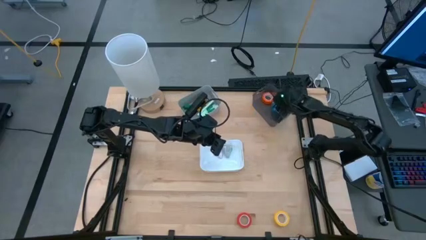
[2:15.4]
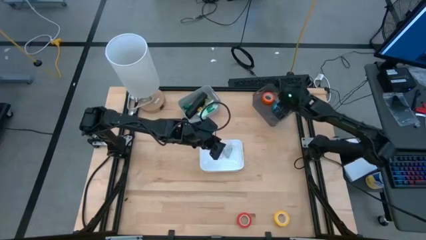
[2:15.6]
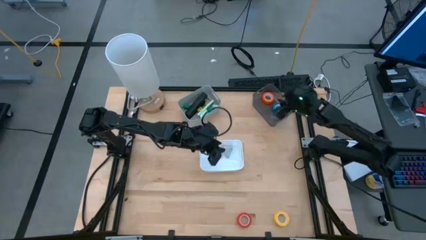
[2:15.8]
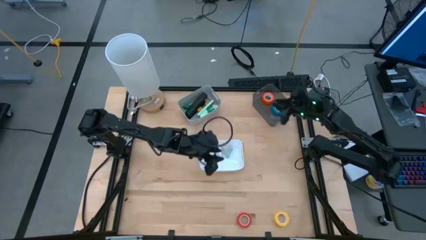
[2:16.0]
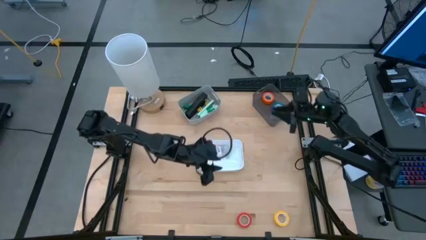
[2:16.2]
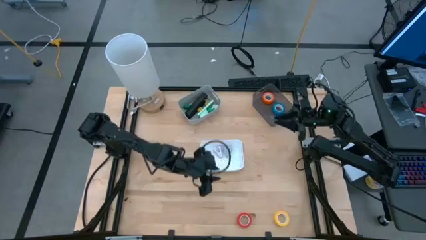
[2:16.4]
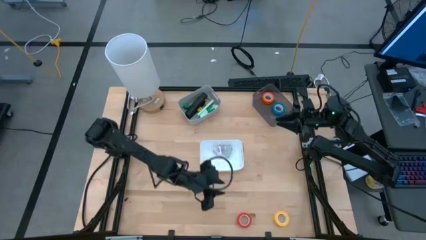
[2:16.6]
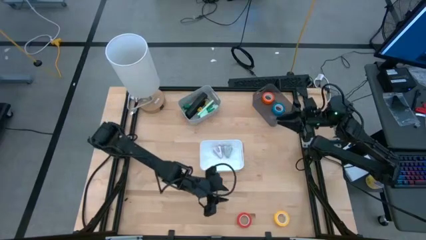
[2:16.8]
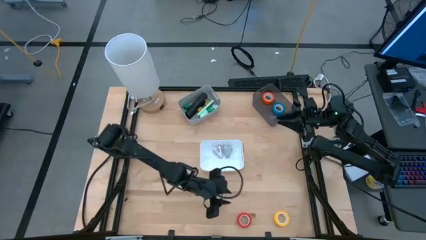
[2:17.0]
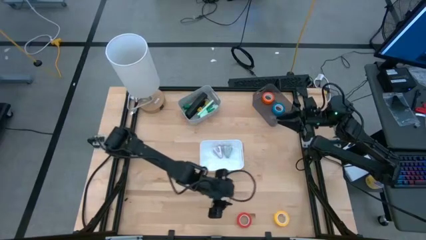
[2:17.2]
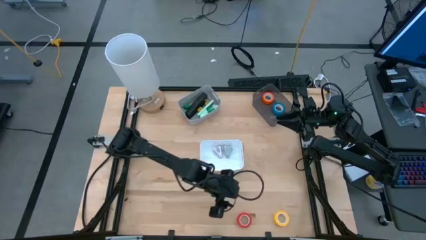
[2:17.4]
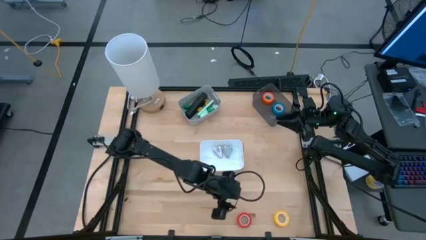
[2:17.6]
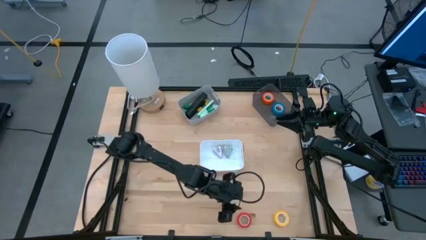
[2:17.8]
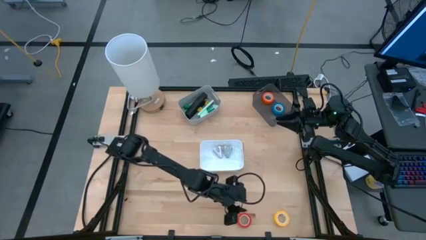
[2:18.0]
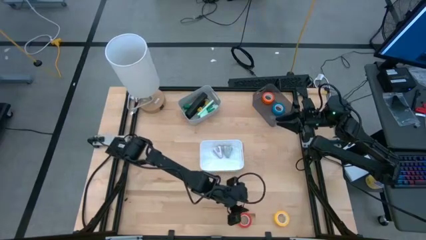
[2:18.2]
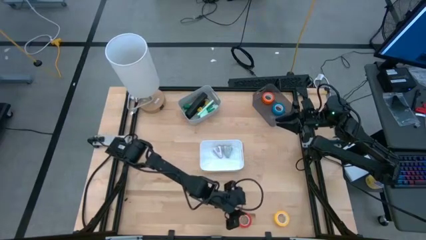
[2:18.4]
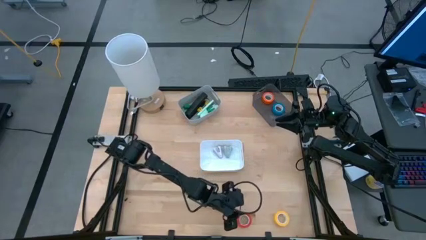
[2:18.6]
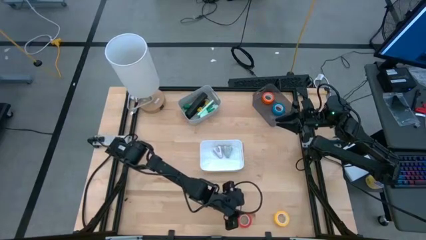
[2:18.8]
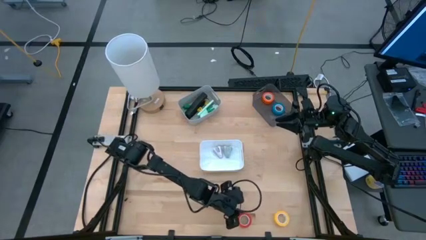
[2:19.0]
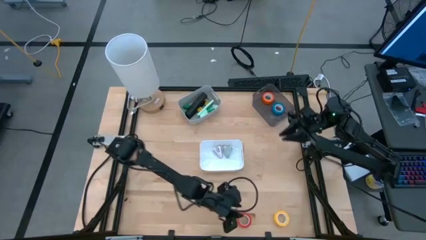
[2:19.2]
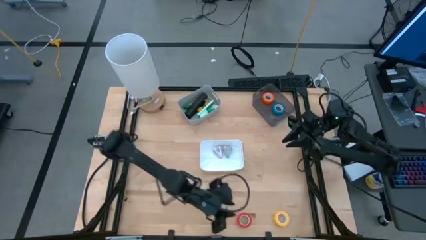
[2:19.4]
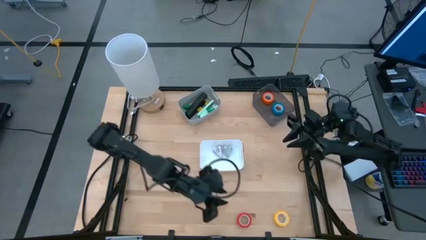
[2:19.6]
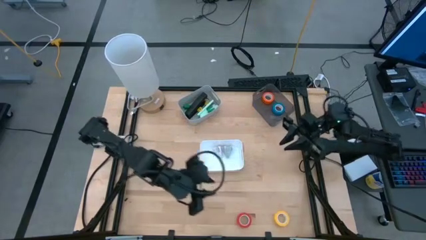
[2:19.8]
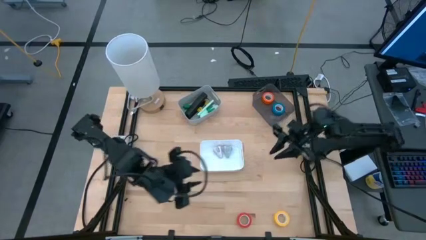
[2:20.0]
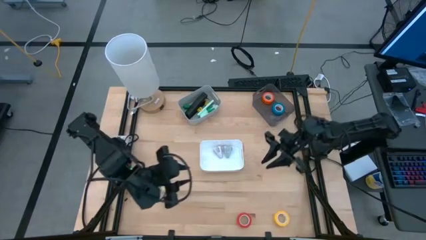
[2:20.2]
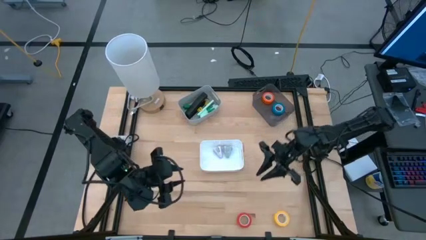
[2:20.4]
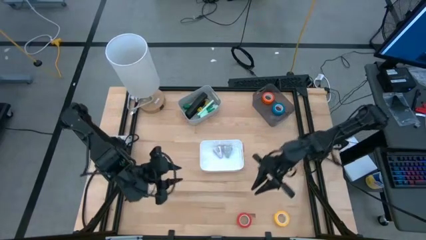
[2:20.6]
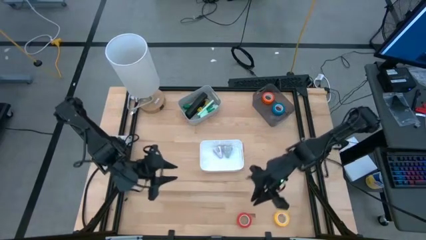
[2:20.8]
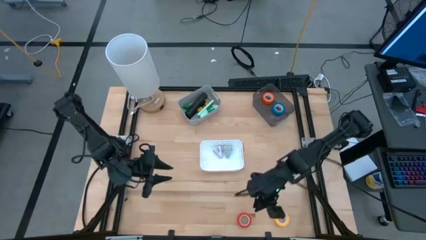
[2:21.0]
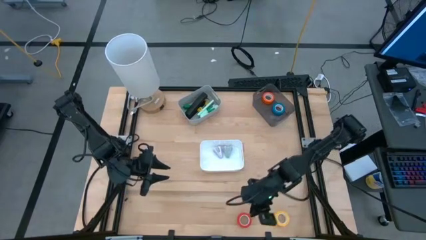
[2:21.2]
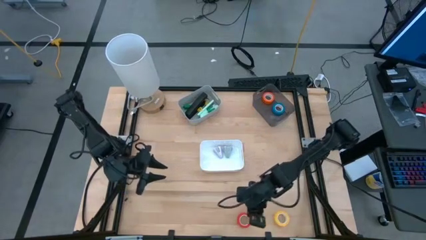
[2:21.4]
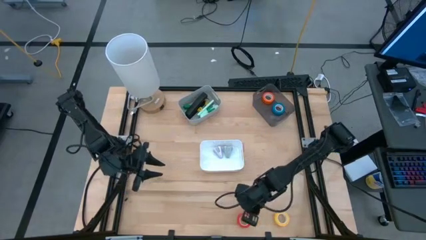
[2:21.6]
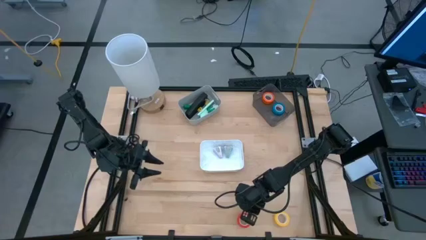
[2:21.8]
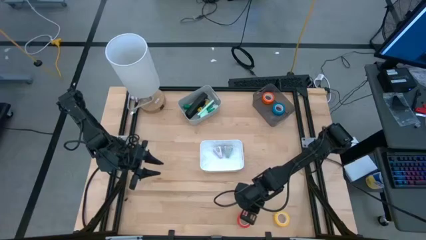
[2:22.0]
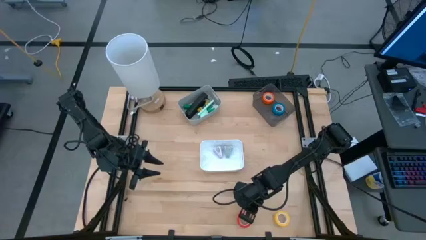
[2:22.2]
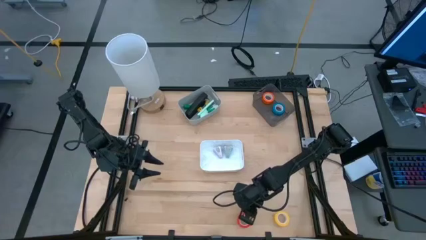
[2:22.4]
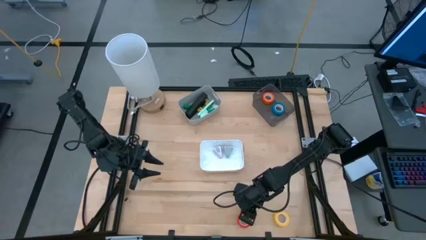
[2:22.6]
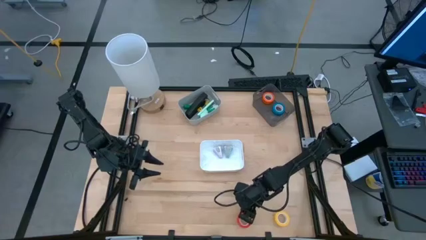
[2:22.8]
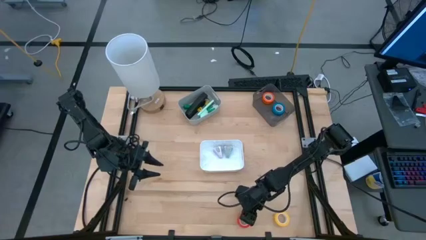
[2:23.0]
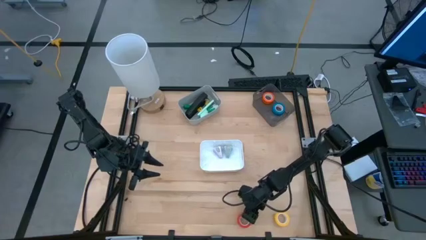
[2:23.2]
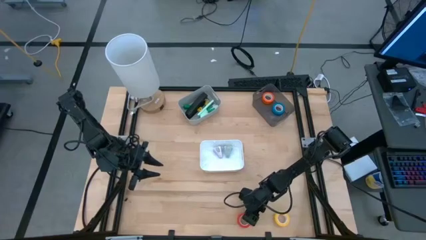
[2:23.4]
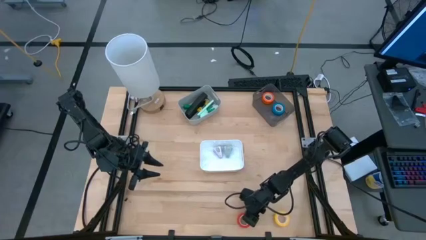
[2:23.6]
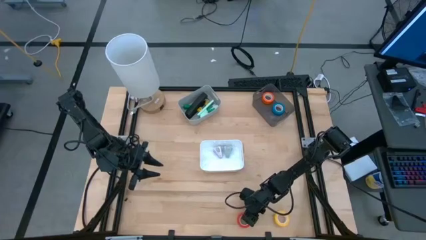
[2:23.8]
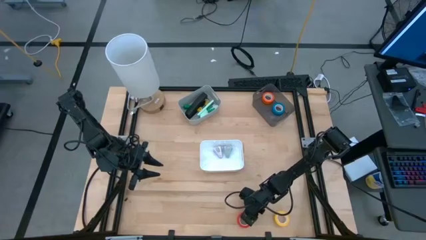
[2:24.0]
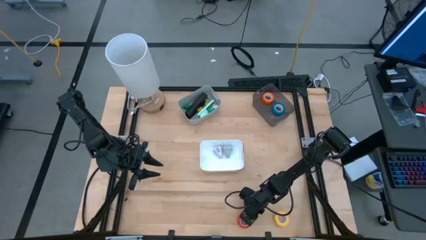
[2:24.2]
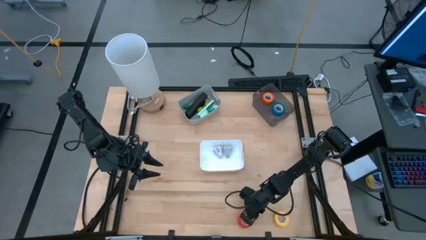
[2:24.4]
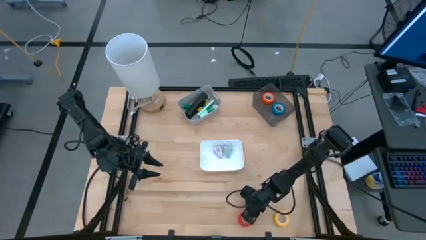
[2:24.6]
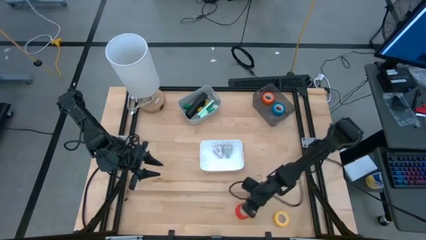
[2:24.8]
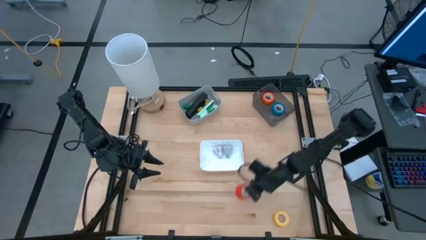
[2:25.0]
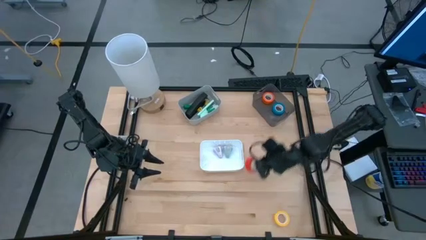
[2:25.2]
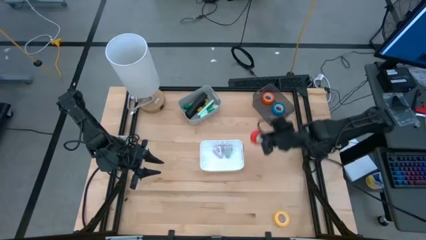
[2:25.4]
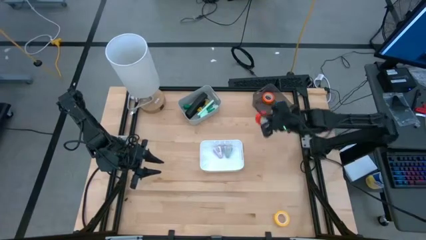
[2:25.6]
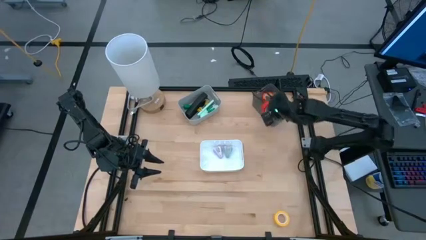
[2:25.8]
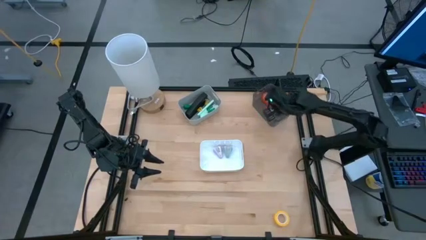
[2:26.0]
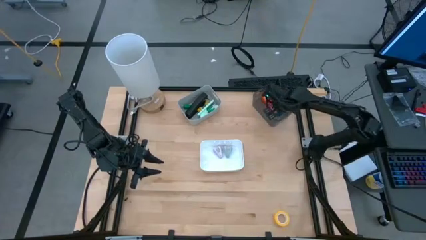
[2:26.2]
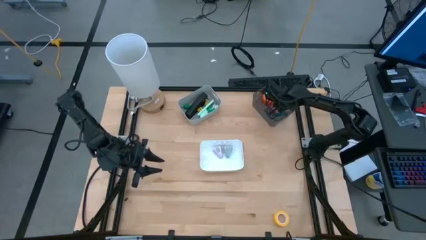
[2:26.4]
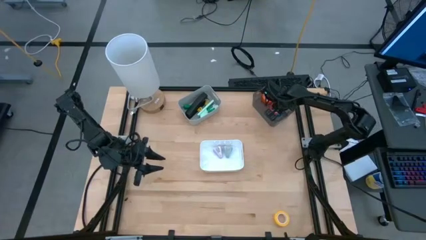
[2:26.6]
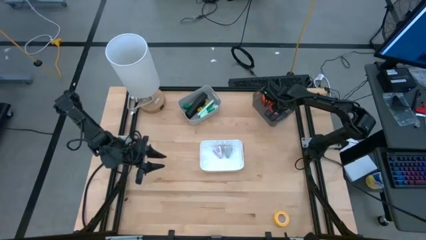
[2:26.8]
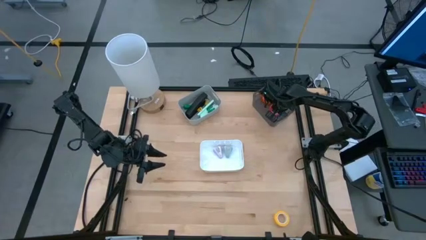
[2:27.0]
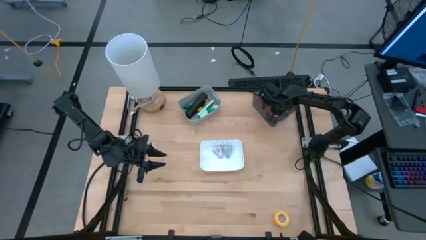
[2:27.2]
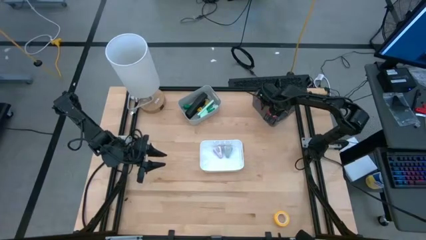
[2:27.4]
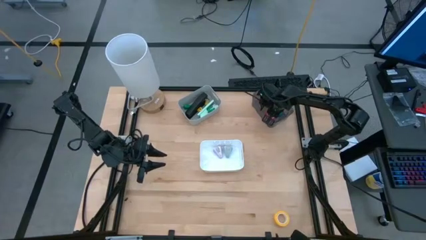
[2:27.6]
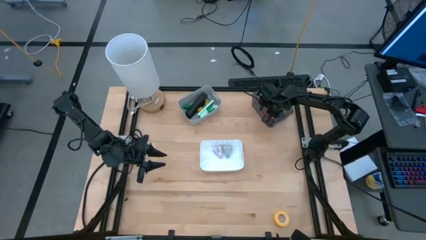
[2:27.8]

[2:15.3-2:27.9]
Task: Pick and place Stapler, Stapler remover, tape
Put the red tape into the black bin

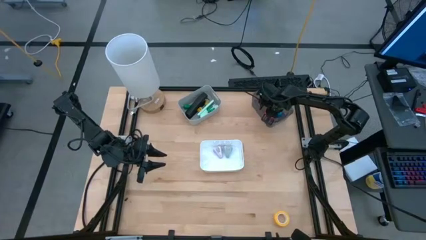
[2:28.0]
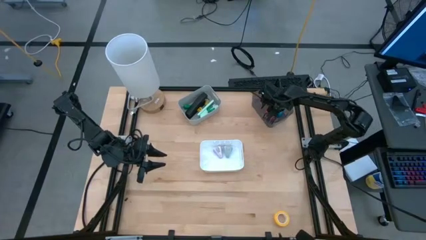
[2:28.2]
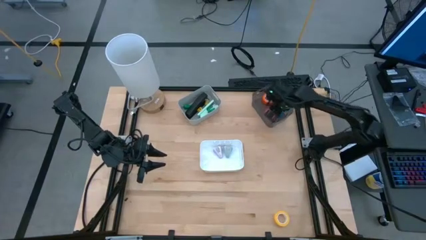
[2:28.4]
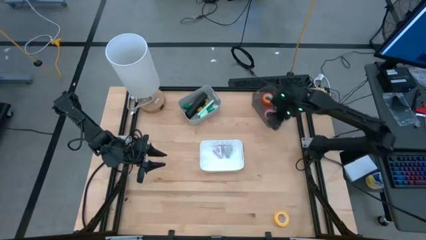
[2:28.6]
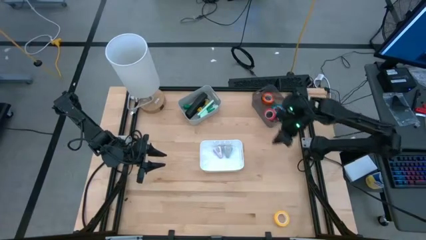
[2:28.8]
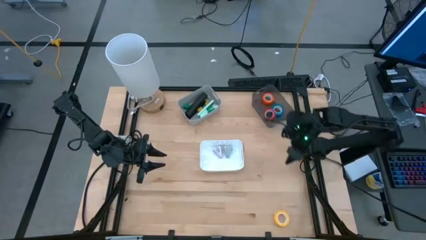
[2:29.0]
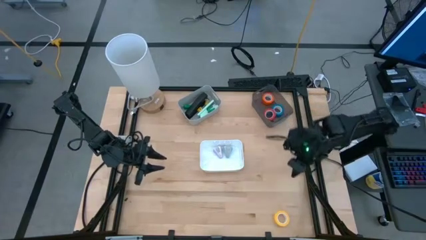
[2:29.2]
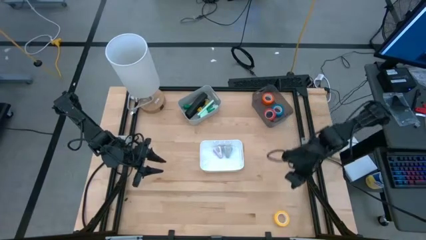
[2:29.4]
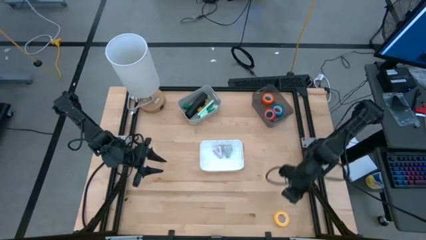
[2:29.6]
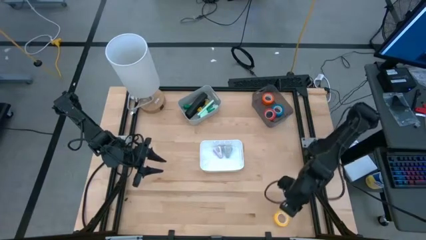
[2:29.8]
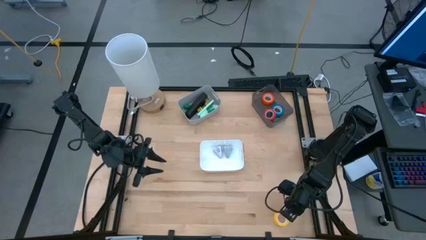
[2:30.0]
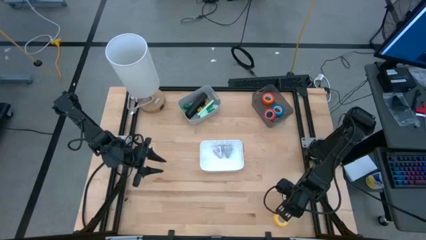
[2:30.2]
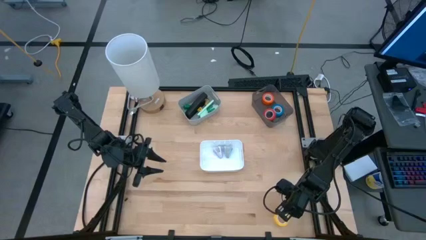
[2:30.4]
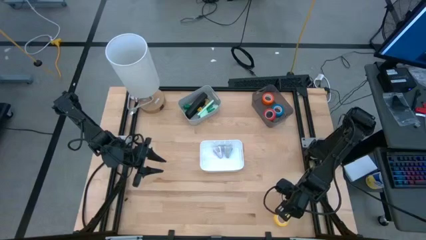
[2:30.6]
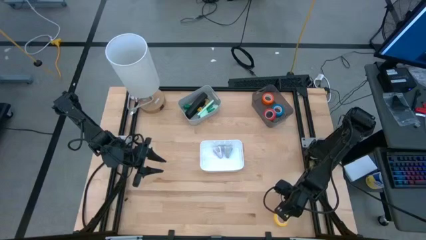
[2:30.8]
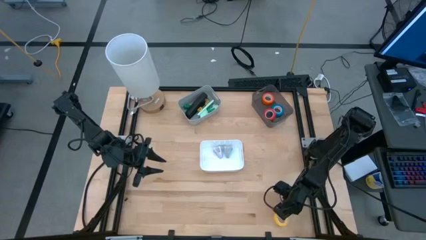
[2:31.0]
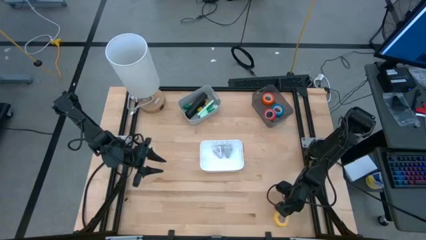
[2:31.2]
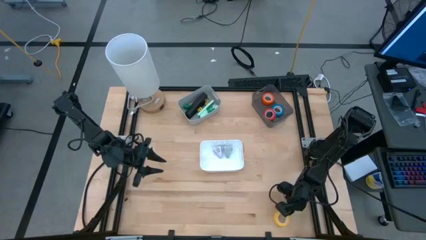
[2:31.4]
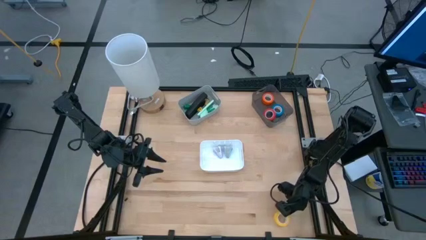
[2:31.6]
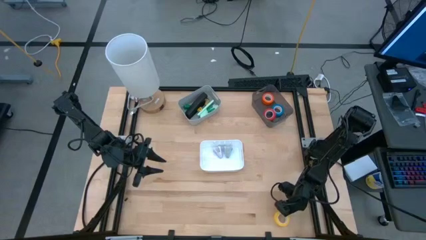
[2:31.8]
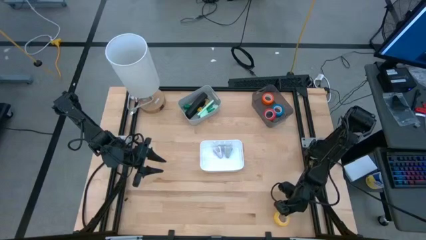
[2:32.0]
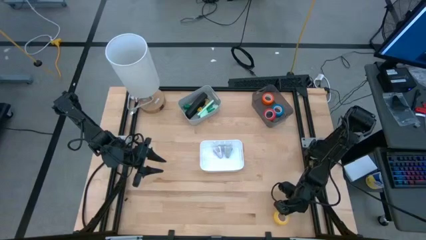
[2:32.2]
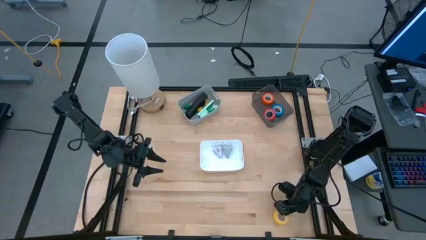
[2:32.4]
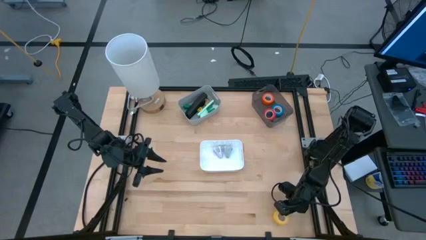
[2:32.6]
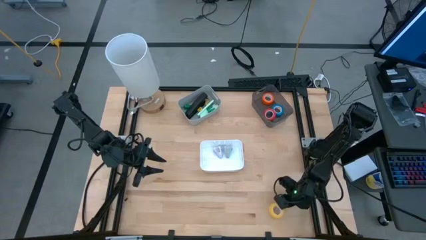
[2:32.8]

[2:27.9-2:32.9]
Put the yellow tape into the black bin
